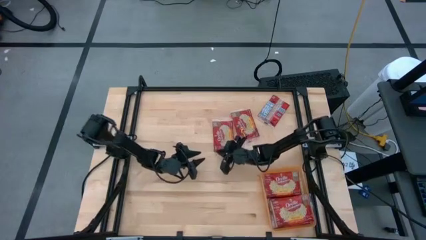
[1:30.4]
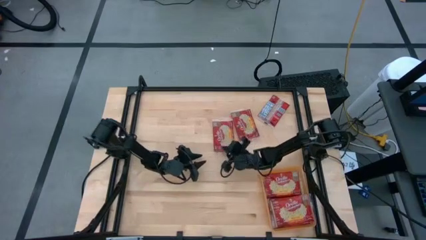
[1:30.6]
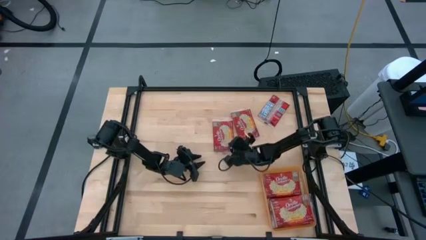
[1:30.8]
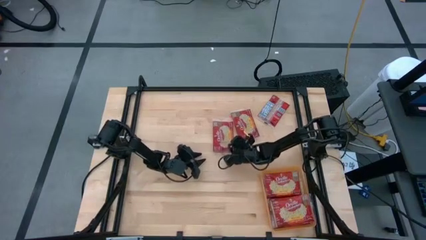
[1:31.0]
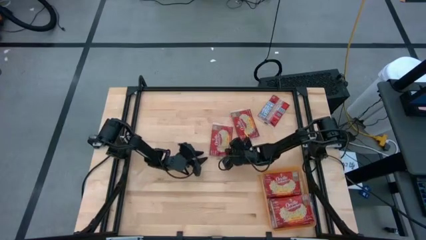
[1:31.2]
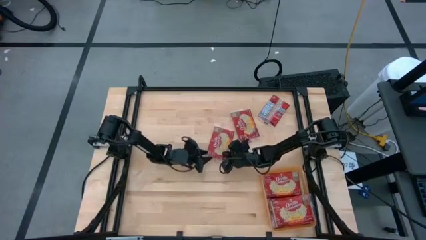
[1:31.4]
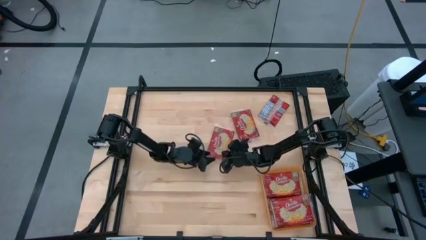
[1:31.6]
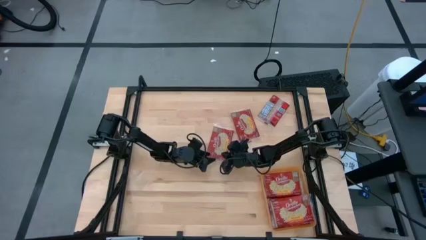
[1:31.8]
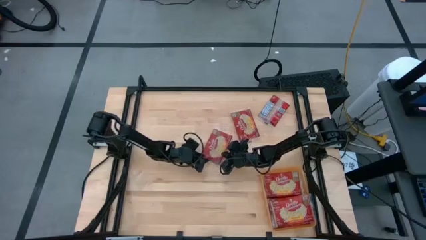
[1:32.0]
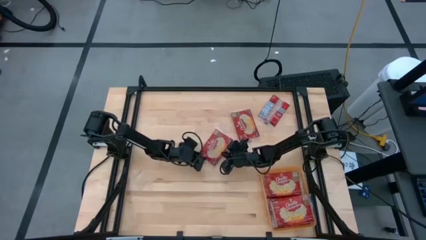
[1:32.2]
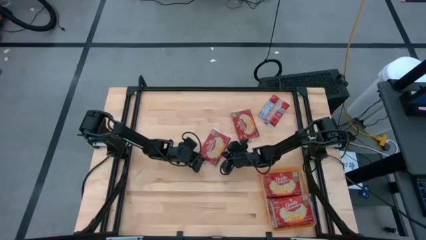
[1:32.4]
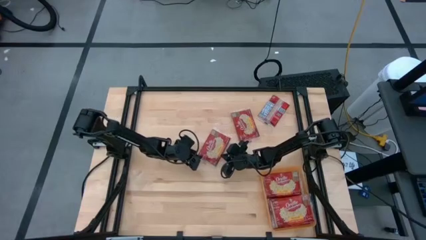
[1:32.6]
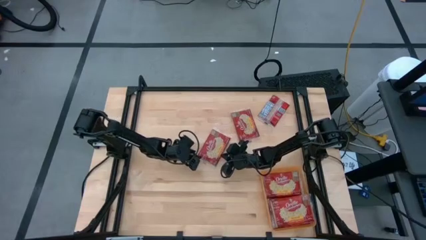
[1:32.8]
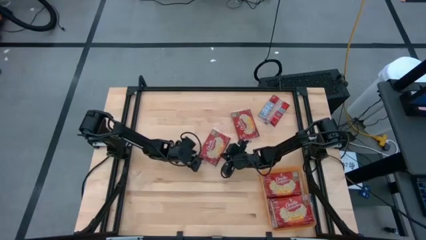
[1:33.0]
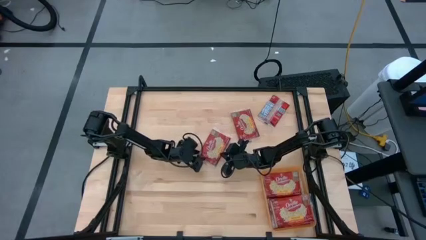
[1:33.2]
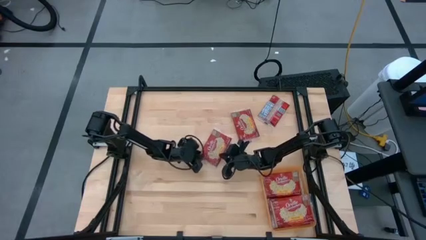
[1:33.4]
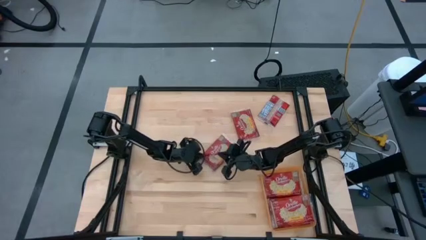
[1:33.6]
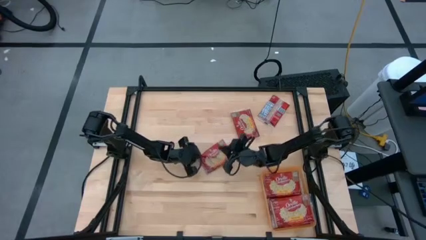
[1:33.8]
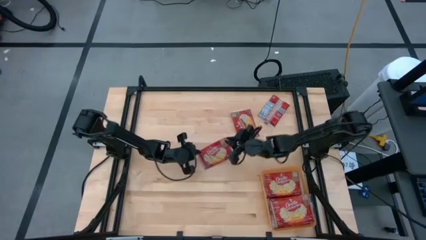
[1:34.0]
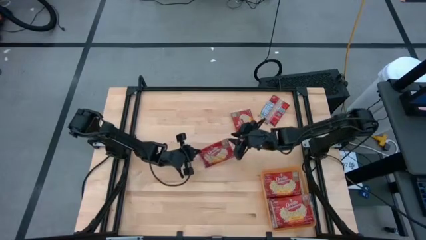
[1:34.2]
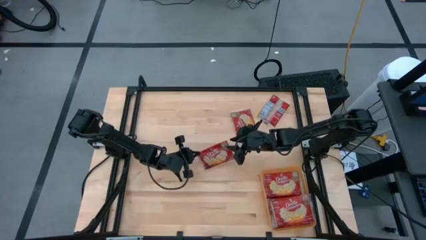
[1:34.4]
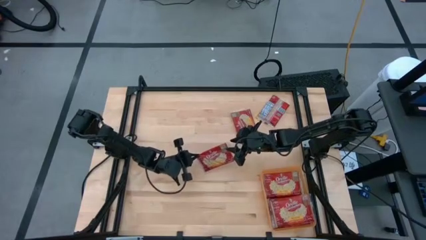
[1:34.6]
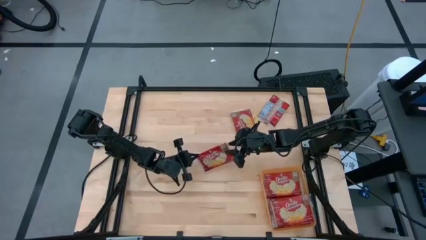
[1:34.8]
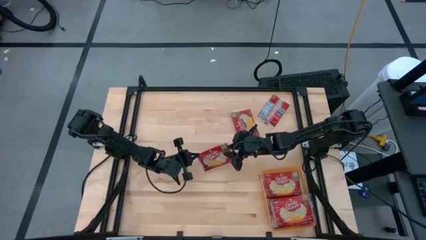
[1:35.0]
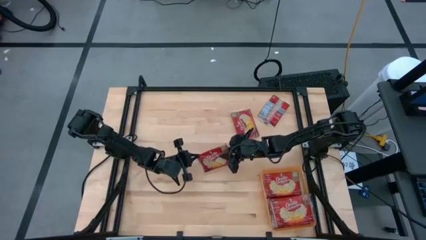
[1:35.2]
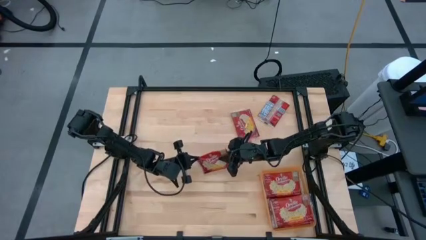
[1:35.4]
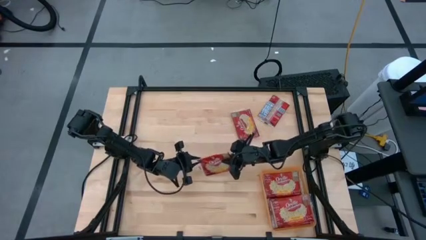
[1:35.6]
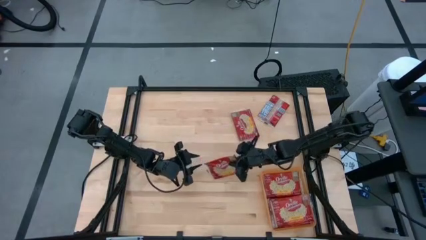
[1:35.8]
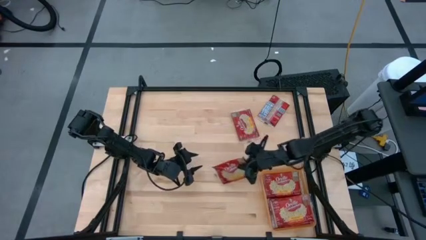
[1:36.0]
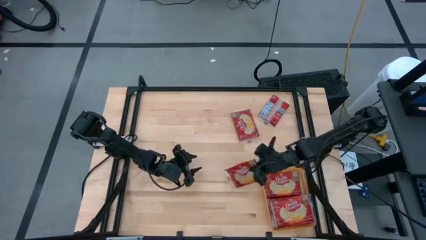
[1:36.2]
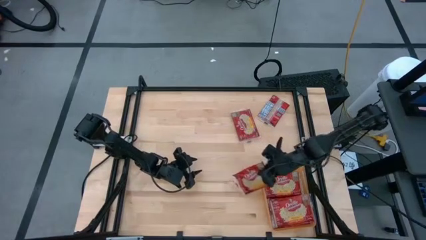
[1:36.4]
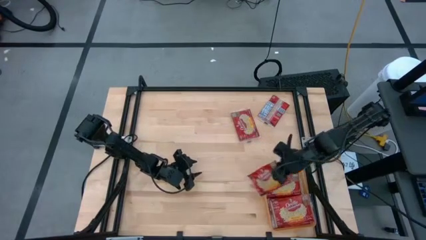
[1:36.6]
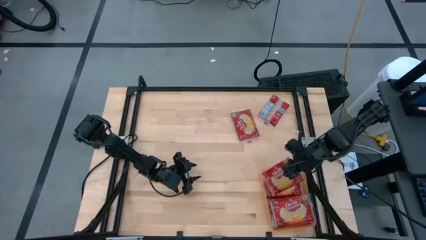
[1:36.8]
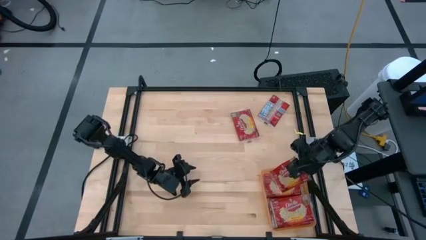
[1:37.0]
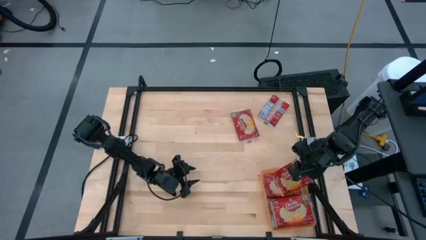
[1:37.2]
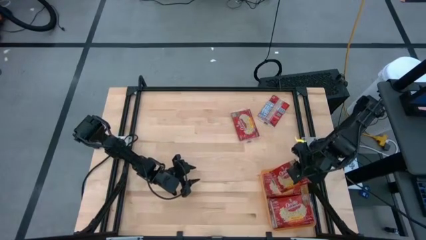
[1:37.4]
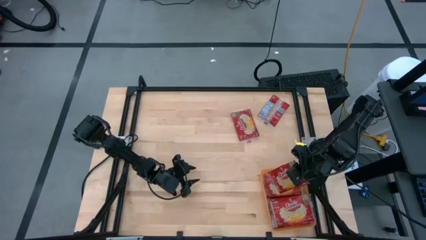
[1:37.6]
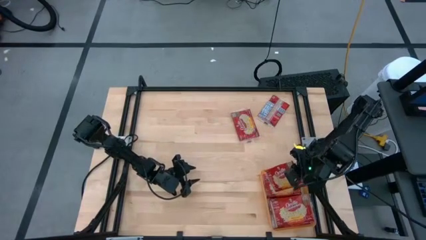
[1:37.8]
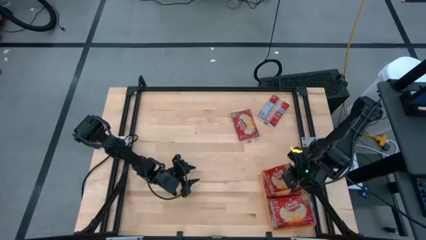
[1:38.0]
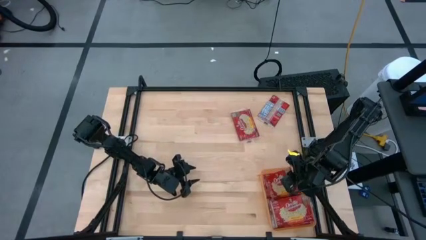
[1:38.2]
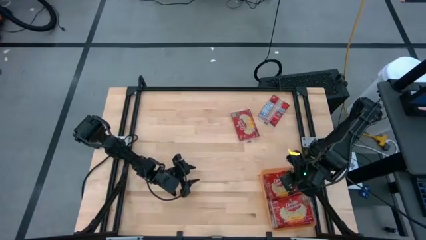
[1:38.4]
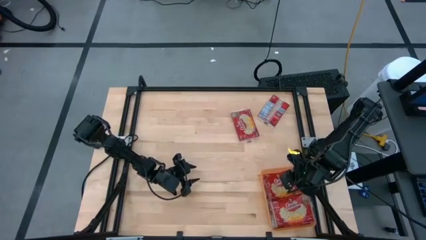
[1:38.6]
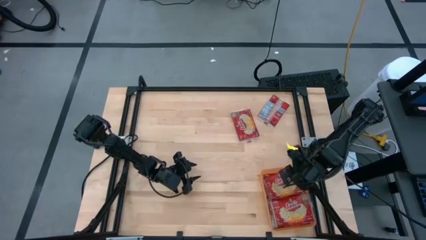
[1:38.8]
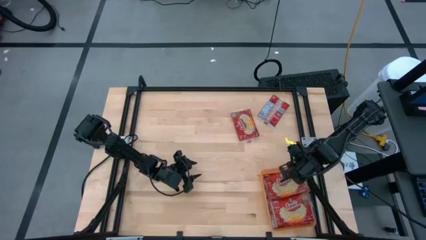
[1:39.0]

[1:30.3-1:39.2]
Task: Sort popcorn bags into baskets
Put the popcorn pack into the orange bin

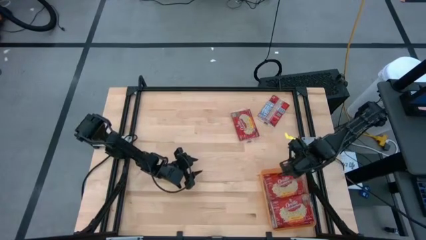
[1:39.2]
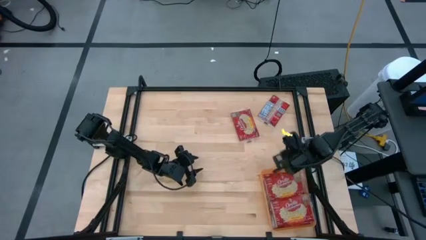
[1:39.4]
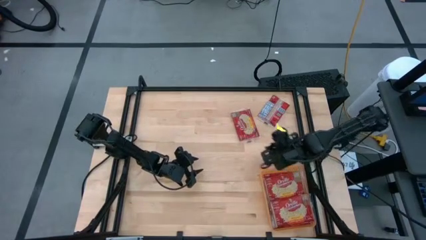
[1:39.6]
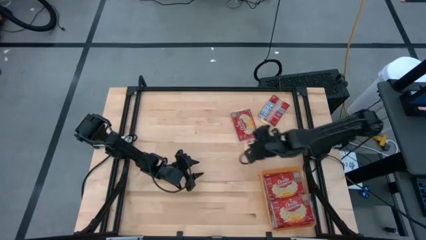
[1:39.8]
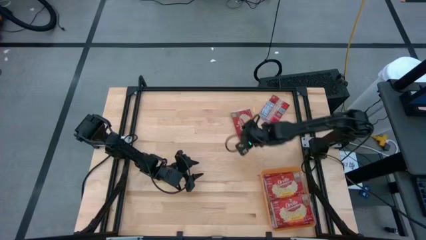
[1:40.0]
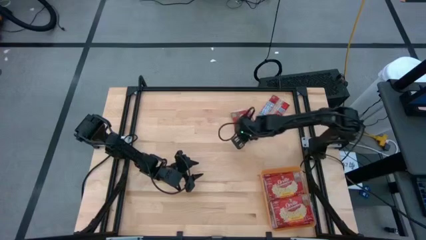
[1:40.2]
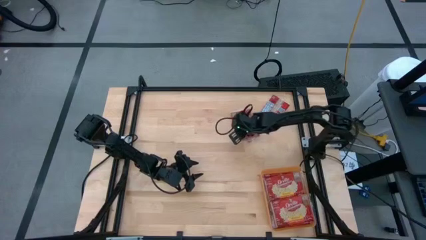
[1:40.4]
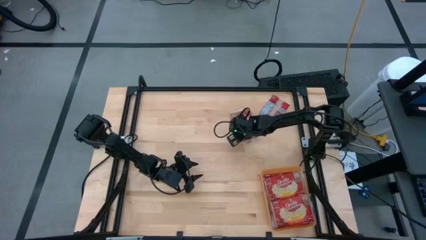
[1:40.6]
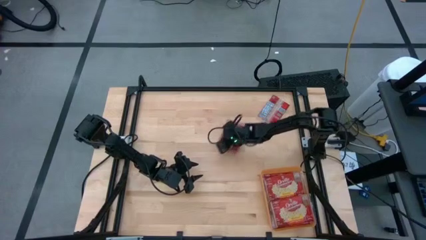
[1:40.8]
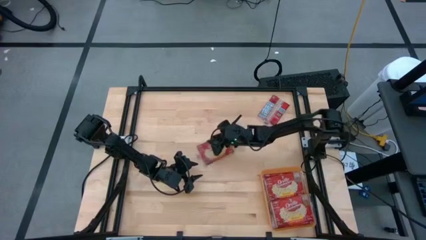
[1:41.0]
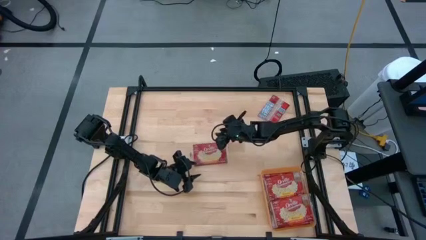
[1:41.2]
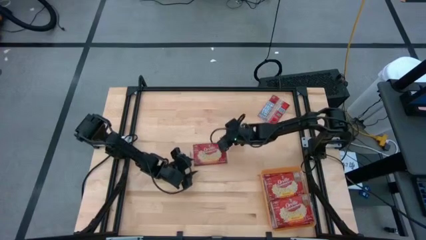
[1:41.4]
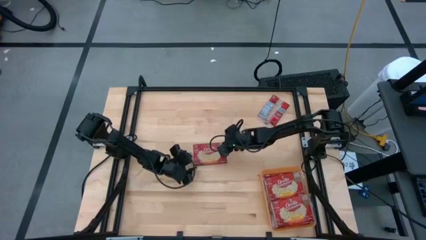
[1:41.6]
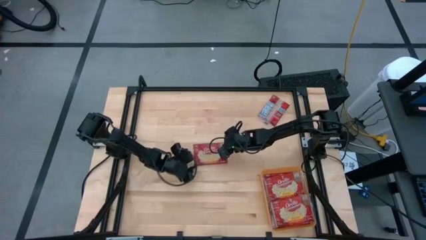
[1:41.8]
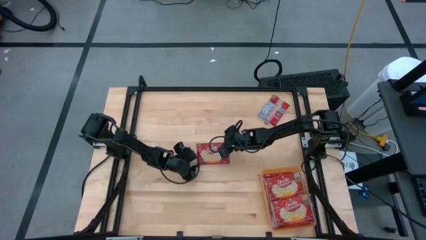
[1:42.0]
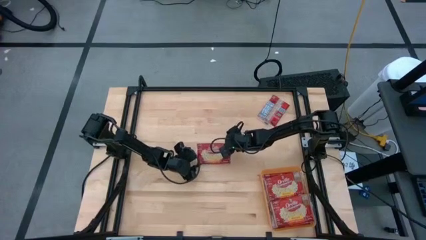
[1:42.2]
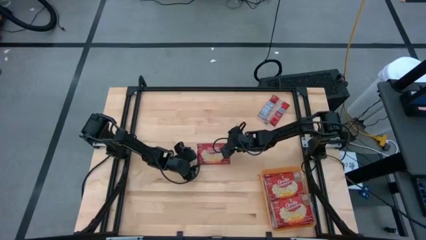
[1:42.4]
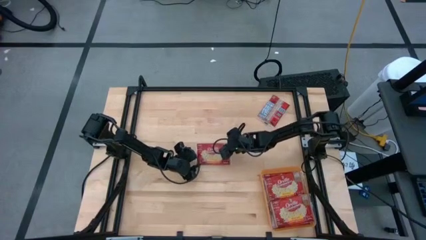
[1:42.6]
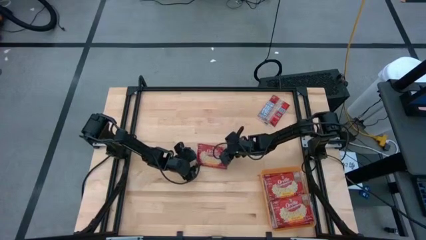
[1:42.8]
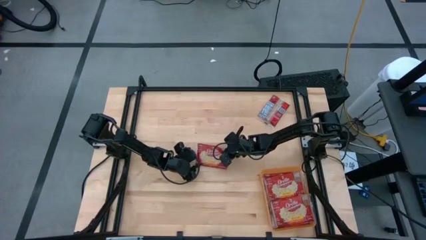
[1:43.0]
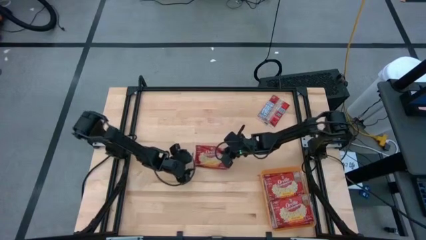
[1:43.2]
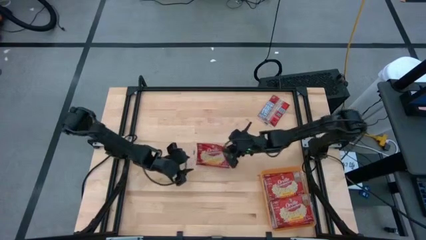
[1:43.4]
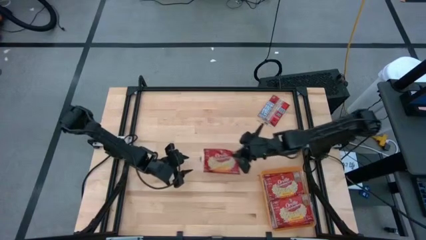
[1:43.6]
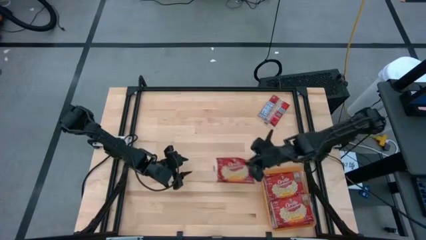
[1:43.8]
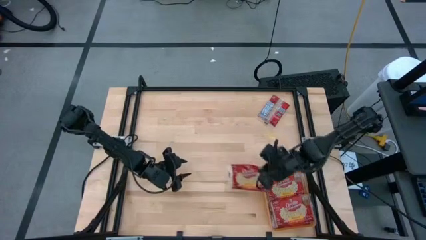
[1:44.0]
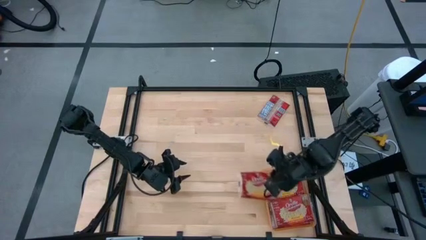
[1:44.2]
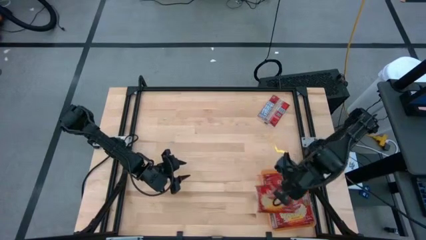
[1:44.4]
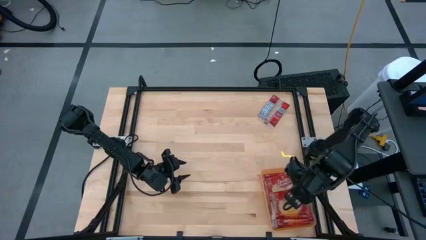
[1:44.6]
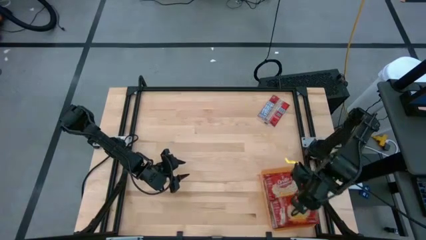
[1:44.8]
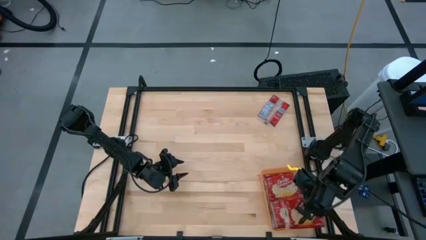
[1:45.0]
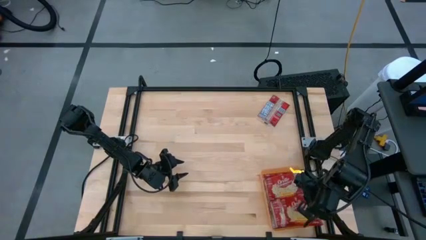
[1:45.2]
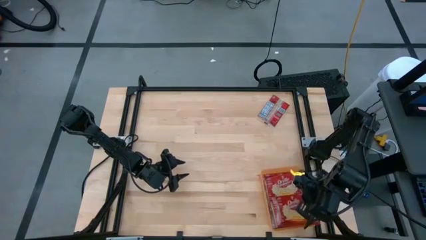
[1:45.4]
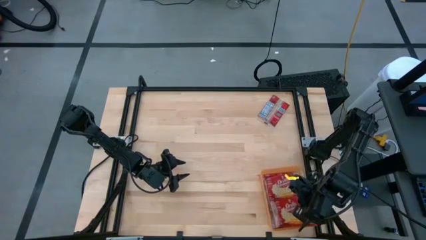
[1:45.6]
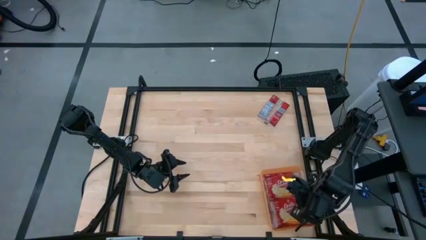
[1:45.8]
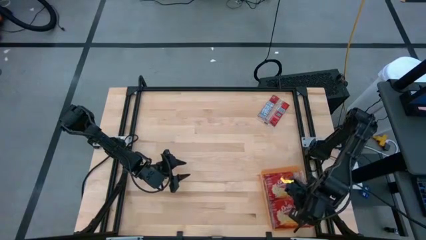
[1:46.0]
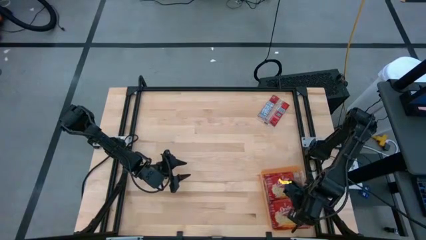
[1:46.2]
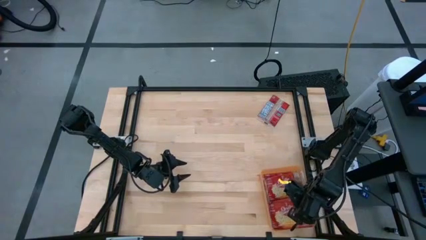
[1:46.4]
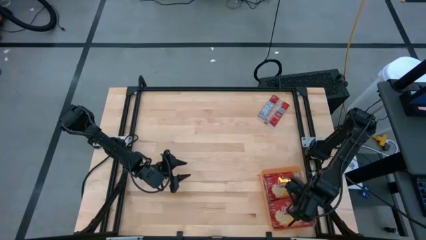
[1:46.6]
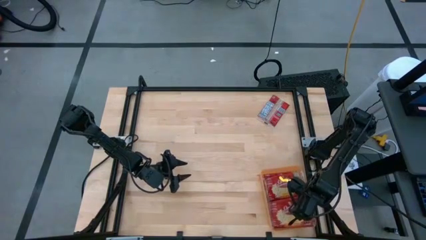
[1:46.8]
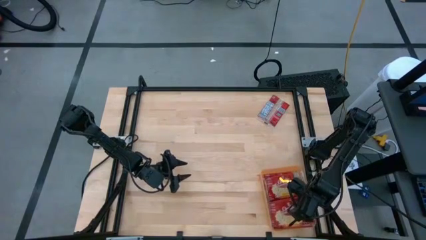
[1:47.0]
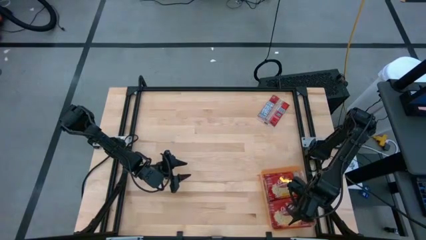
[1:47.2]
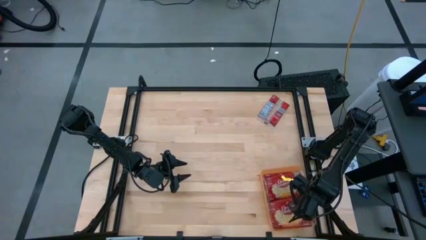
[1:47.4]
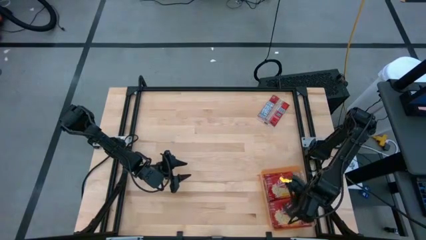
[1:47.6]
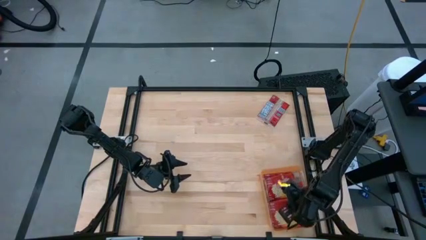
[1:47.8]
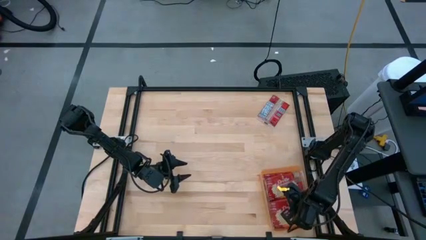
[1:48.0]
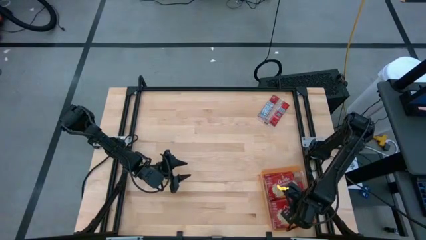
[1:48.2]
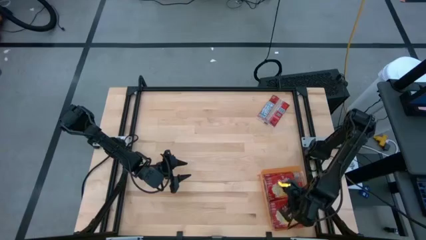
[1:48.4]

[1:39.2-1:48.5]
Put the popcorn pack into the orange bin
